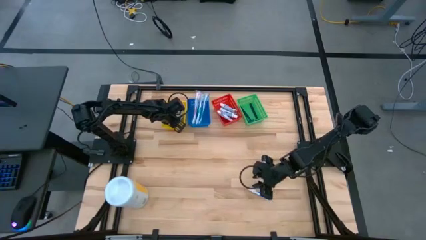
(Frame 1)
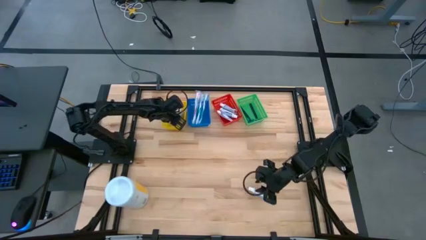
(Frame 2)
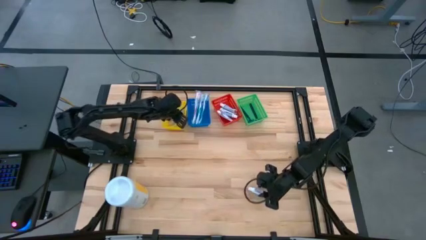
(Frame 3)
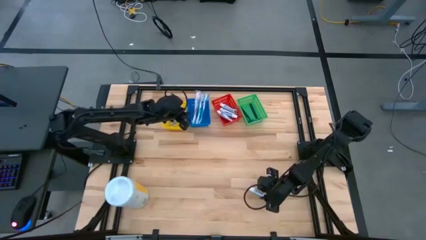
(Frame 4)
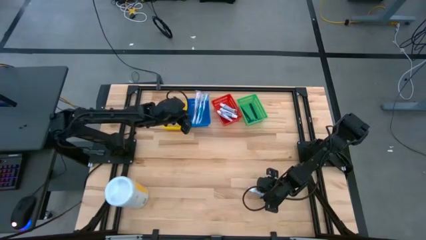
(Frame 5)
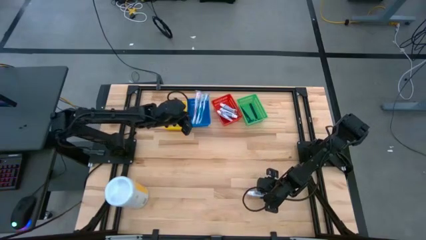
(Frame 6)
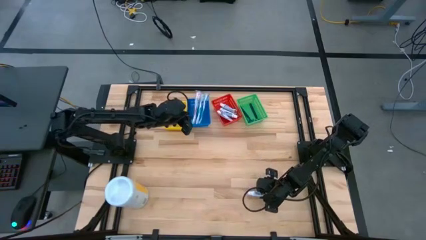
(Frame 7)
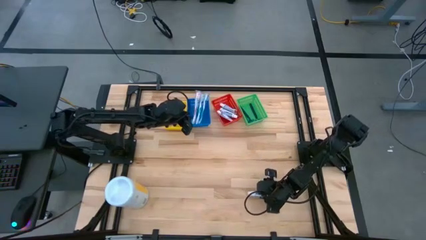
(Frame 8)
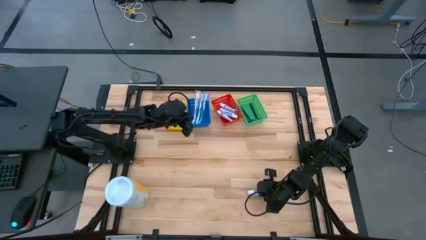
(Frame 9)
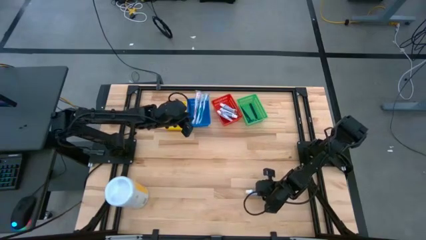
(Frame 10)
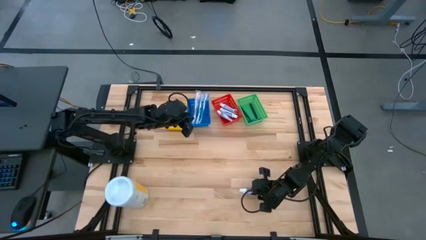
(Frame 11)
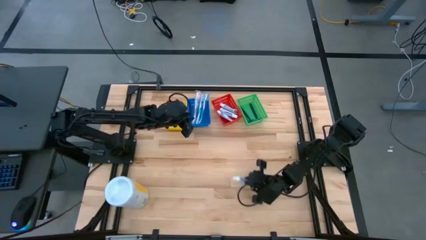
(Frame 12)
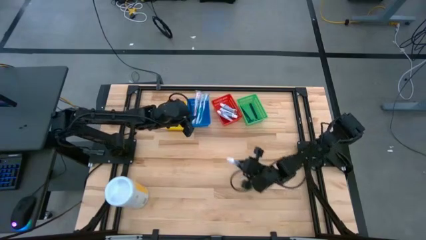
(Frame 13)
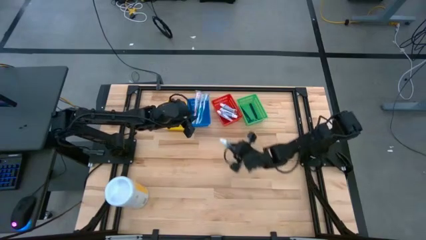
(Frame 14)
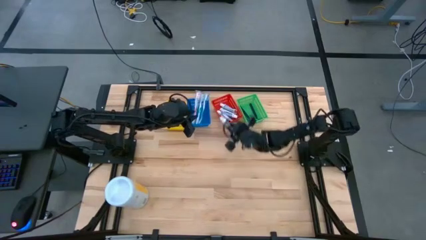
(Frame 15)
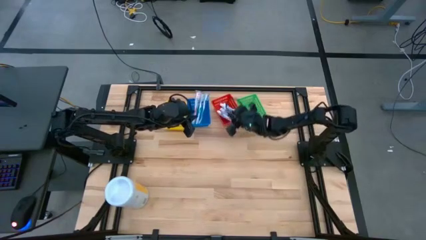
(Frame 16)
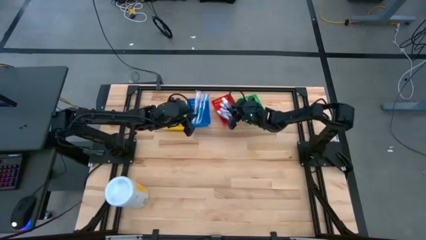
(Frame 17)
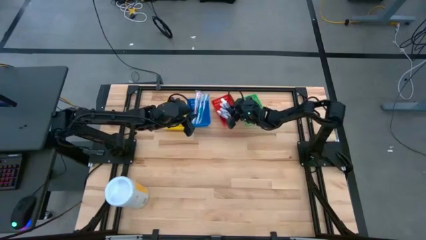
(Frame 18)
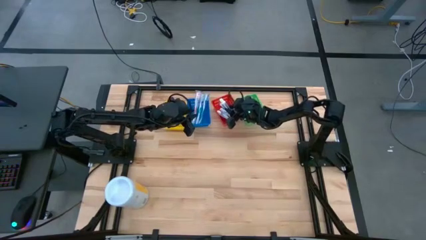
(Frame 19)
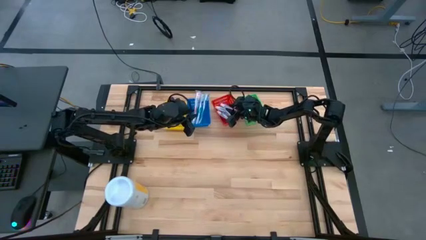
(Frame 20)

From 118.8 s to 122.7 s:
Task: Pick & Place Travel size toiletries
Put the toothpaste into the red bin

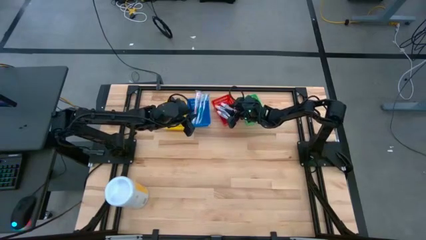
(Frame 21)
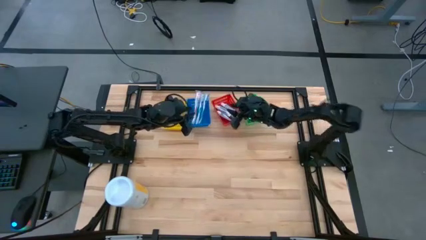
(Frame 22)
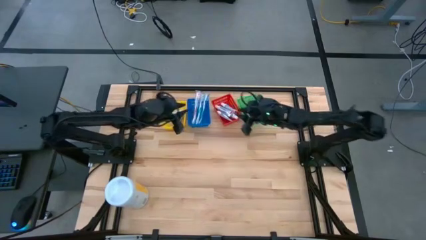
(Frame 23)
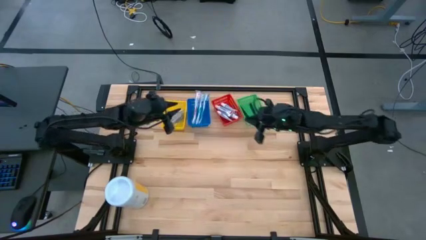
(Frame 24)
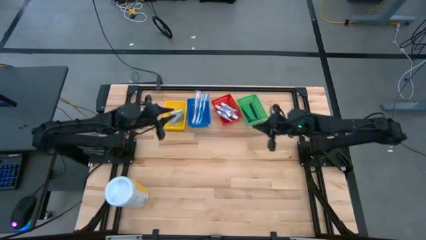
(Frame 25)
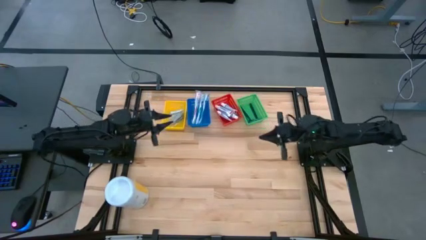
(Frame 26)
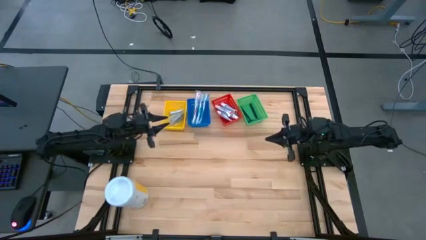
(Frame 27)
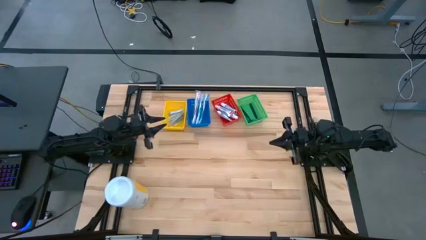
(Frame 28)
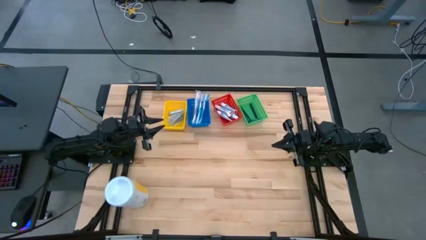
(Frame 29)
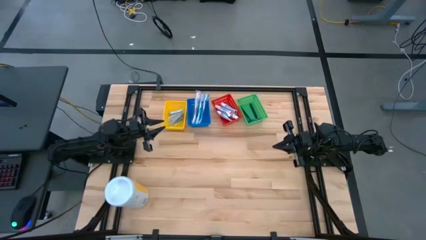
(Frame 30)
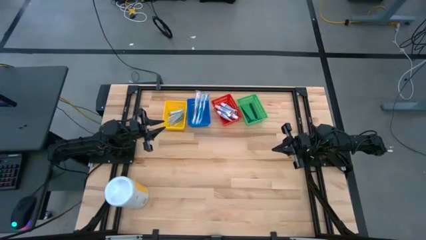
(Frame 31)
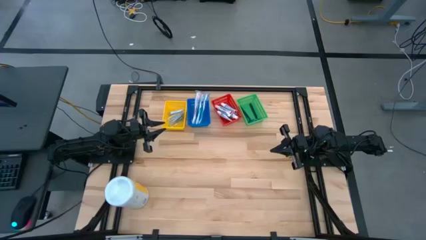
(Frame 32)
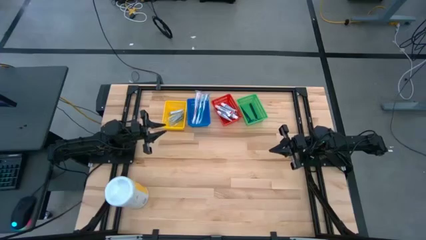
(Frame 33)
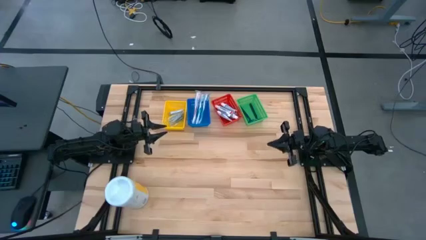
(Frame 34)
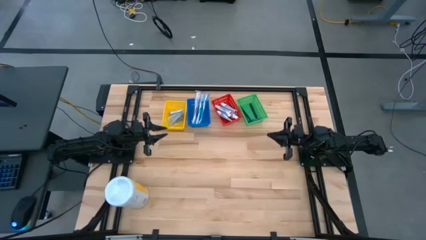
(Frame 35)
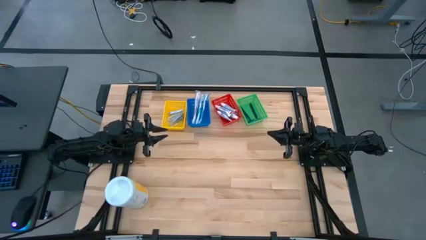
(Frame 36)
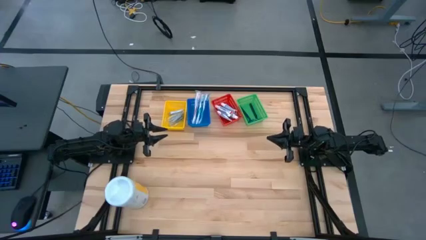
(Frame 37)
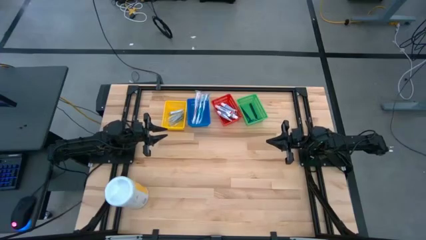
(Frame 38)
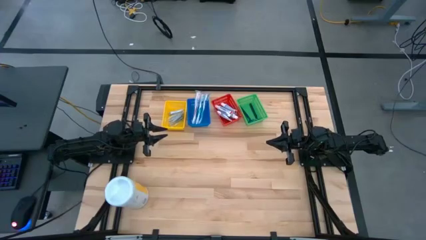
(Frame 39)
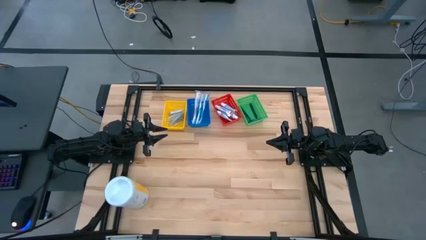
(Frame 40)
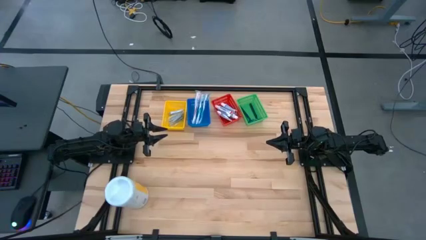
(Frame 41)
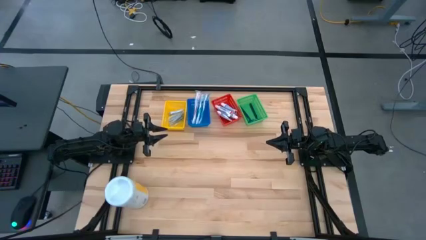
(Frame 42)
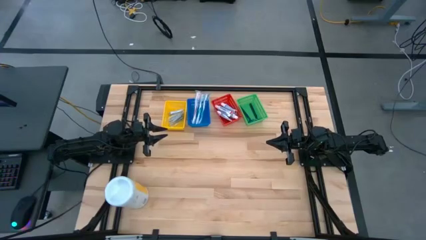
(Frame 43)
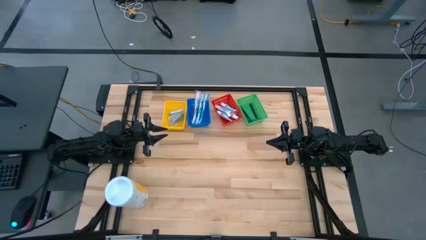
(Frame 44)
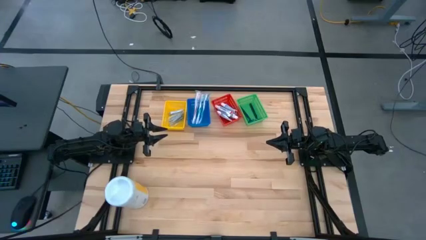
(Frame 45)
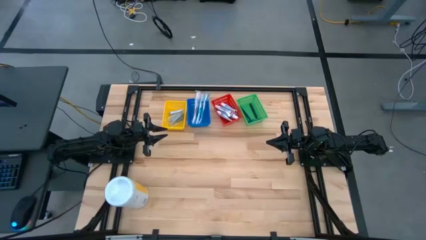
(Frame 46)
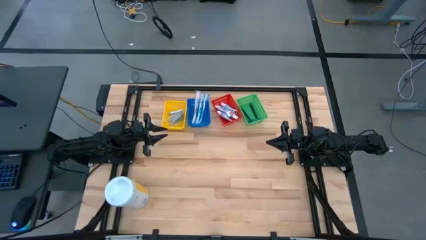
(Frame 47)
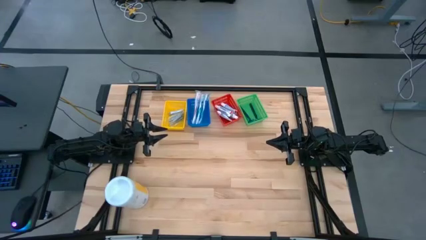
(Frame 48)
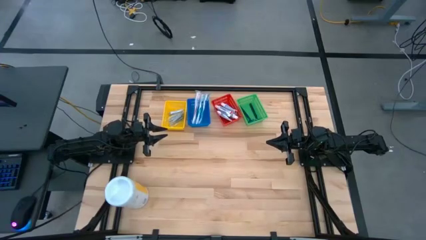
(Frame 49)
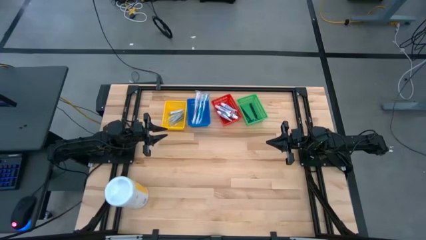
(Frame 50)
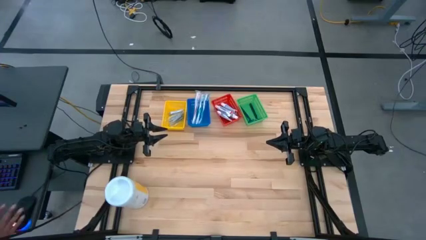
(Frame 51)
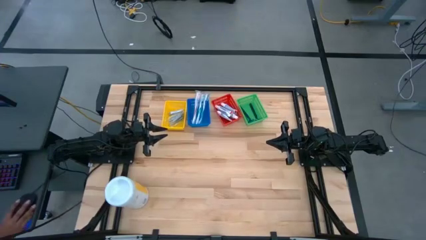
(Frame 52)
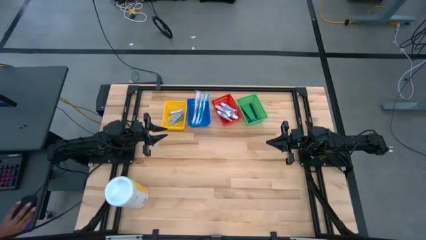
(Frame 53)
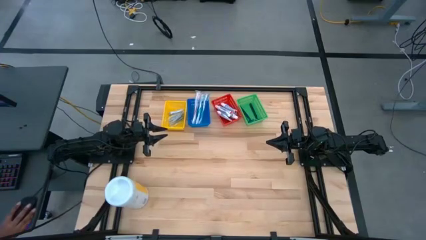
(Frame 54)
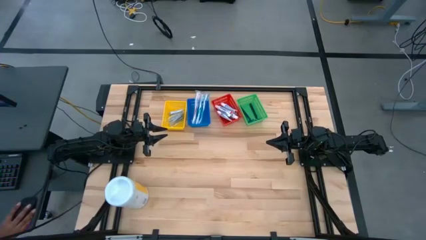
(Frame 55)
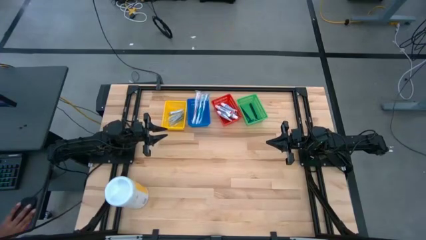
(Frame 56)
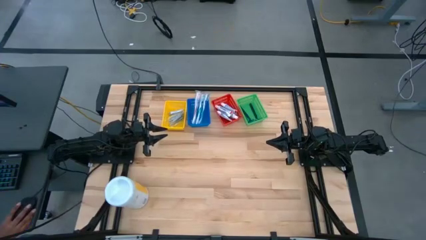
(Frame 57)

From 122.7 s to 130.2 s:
Return to Home Position

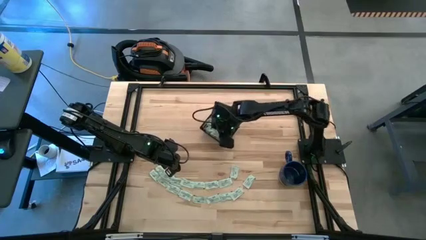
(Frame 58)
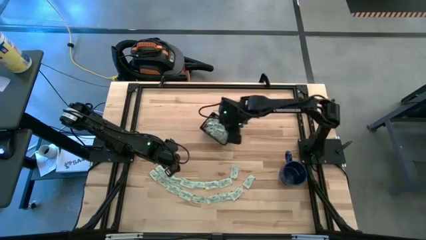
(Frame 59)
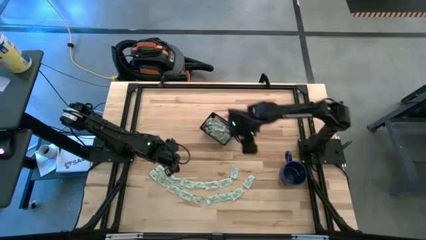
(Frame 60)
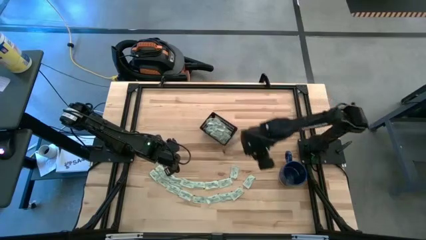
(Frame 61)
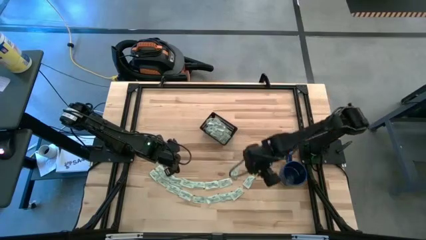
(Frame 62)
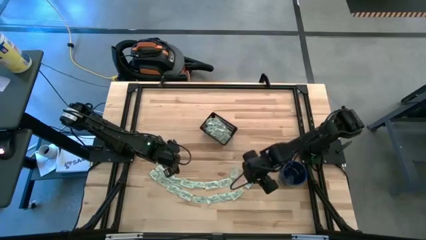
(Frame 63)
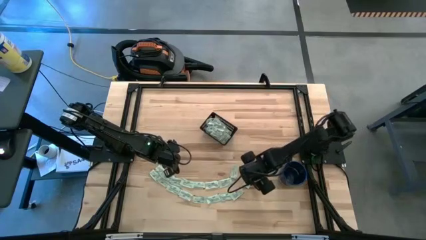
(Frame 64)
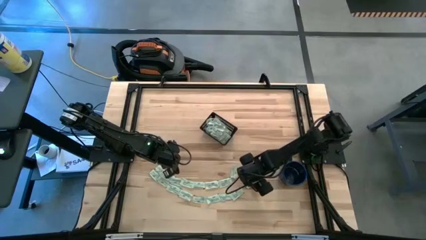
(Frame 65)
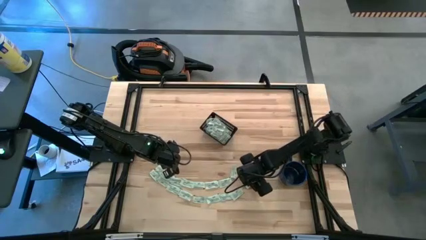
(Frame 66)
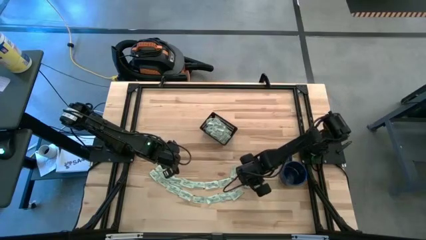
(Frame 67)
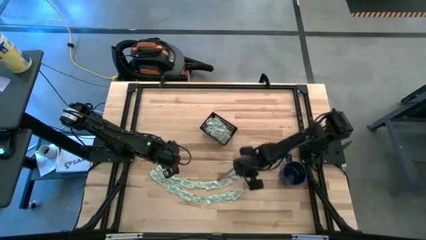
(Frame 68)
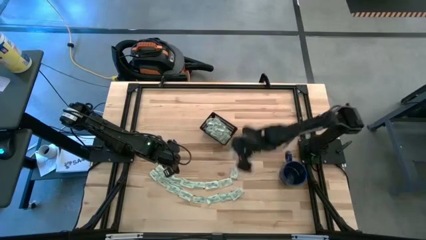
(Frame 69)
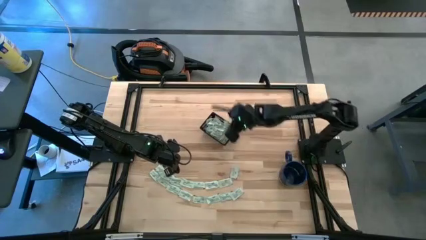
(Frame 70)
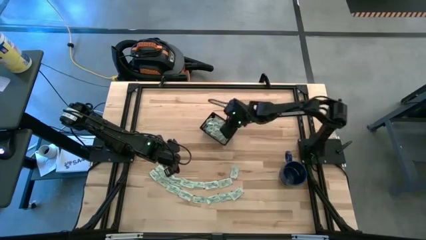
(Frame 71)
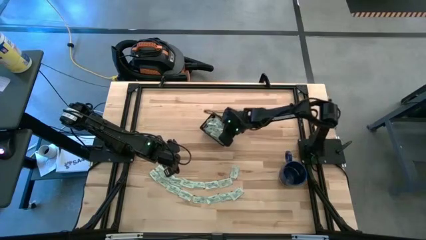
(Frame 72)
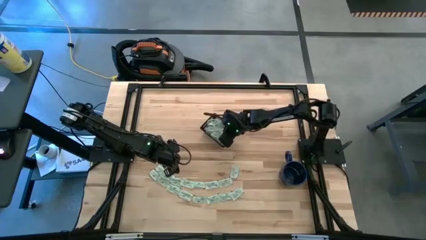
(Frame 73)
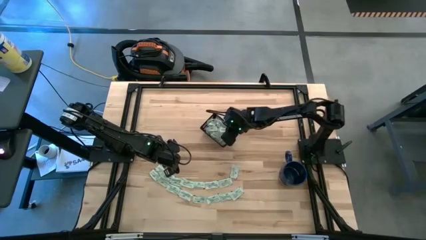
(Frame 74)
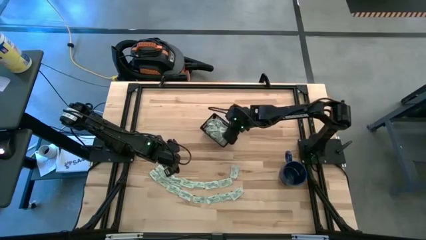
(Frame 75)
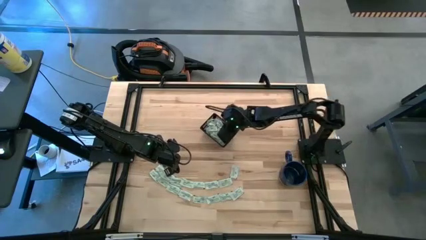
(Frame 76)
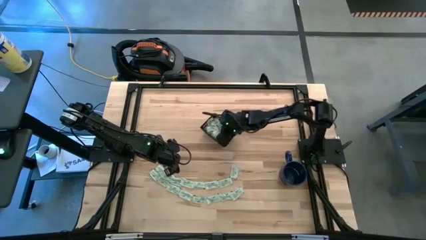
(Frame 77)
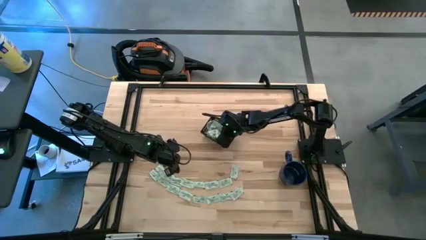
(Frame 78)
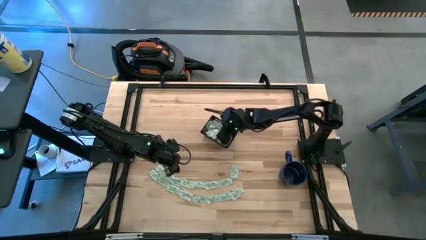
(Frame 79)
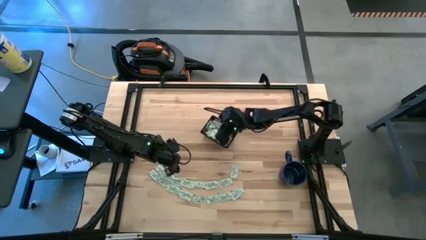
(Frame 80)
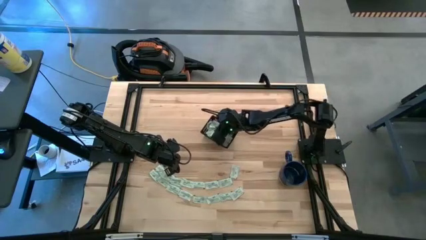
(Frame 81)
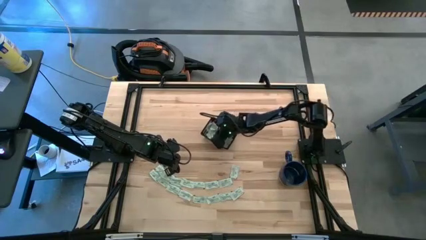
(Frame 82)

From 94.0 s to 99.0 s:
Task: Pick and place Stevia / Truvia into bins
Put the stevia packet into the black bin

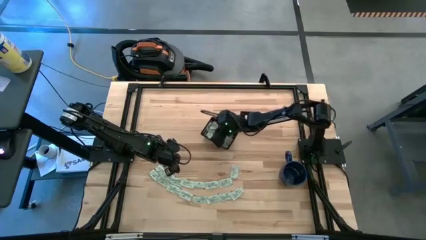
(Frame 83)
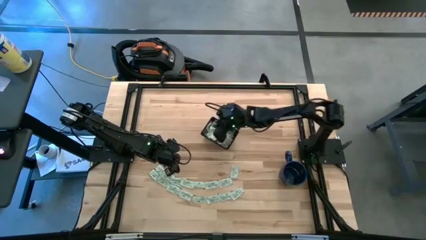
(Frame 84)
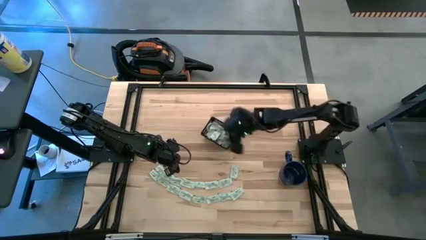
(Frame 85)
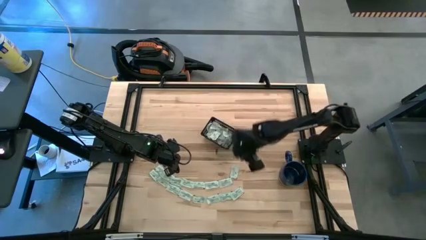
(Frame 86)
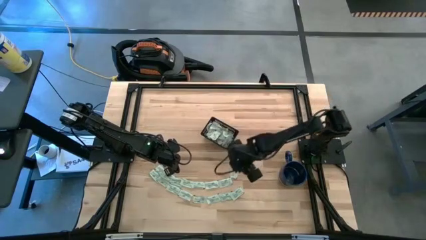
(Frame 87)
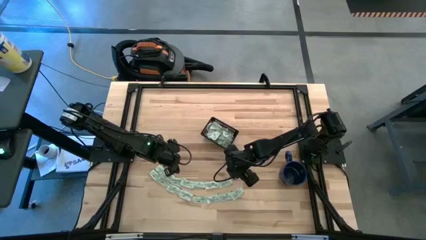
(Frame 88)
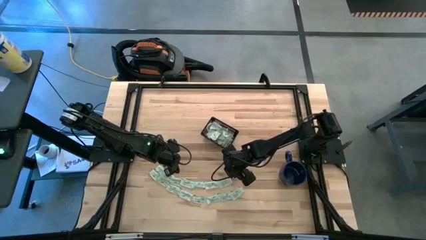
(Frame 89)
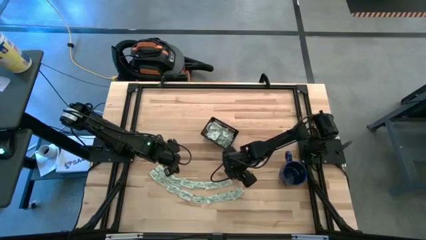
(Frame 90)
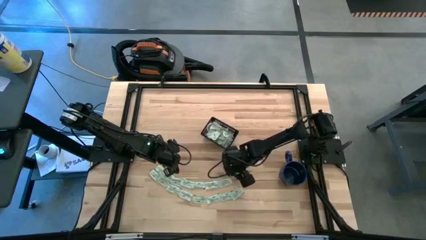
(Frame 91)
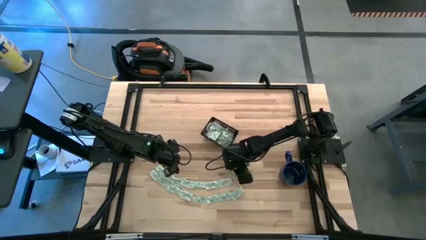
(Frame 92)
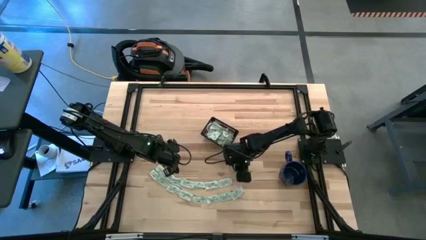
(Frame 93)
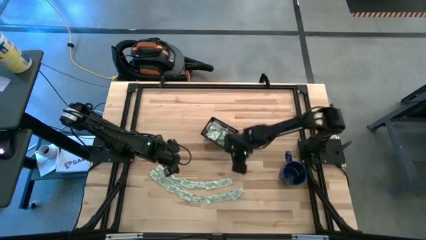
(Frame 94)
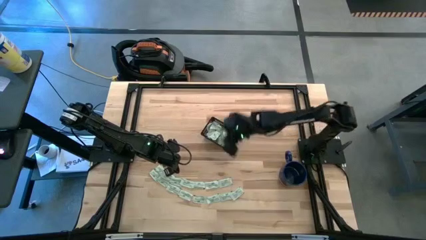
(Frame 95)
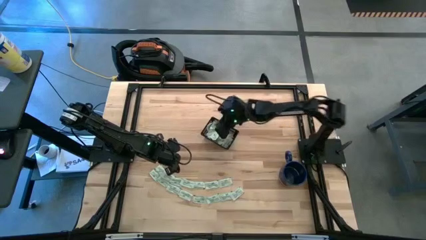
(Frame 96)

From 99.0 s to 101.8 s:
Put the stevia packet into the black bin
